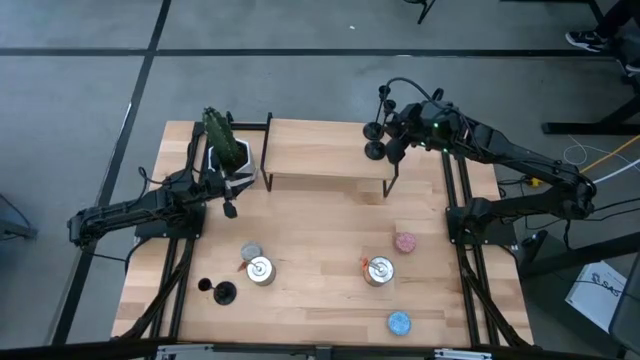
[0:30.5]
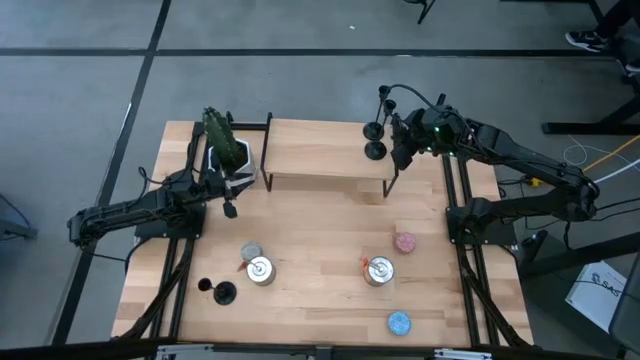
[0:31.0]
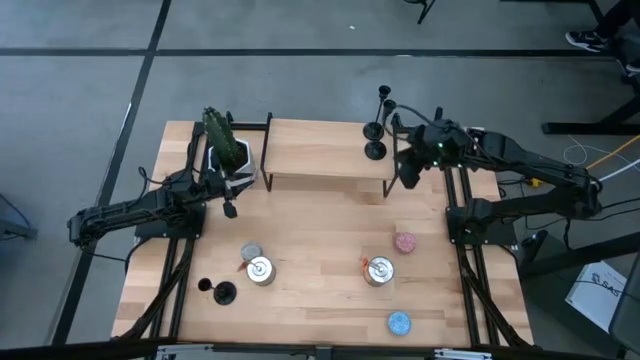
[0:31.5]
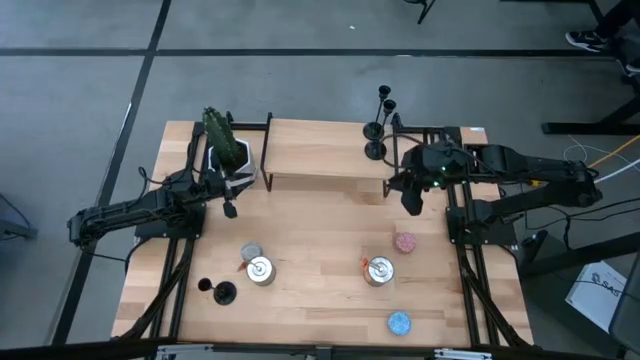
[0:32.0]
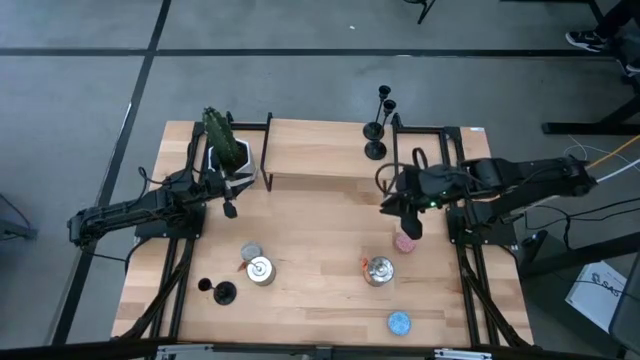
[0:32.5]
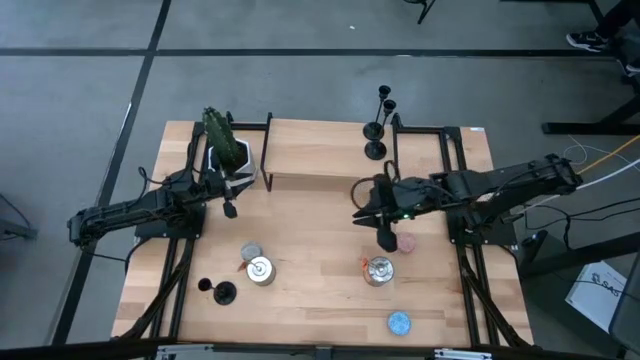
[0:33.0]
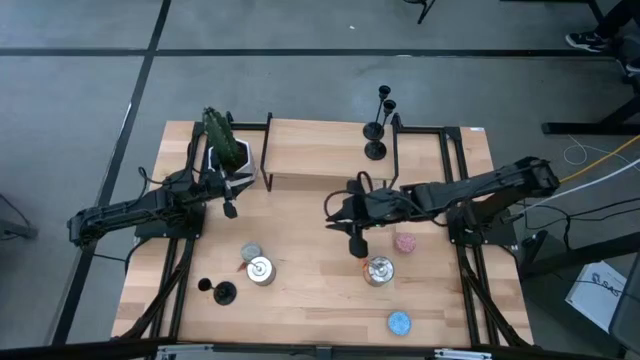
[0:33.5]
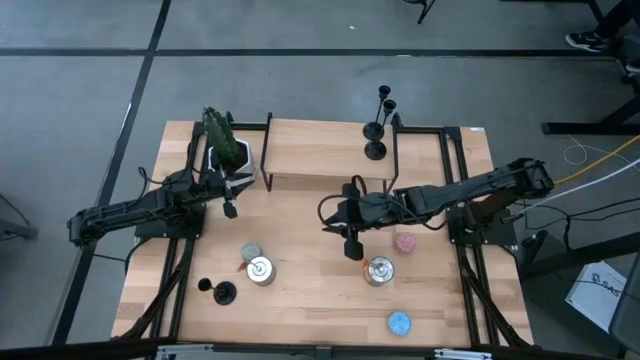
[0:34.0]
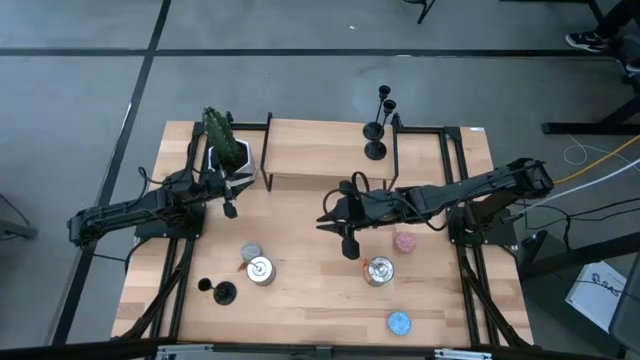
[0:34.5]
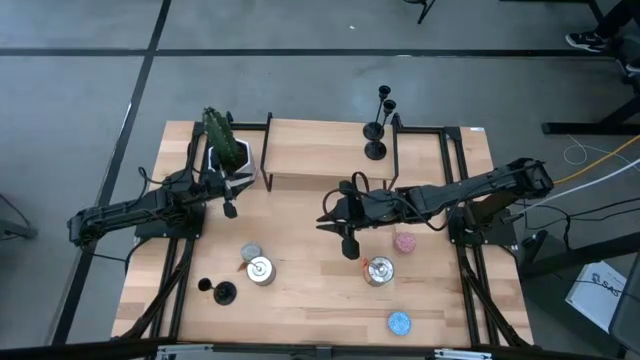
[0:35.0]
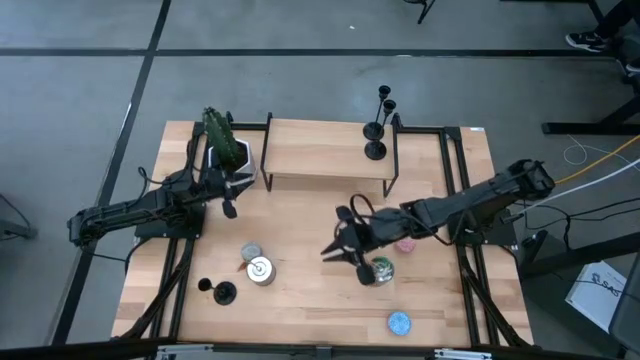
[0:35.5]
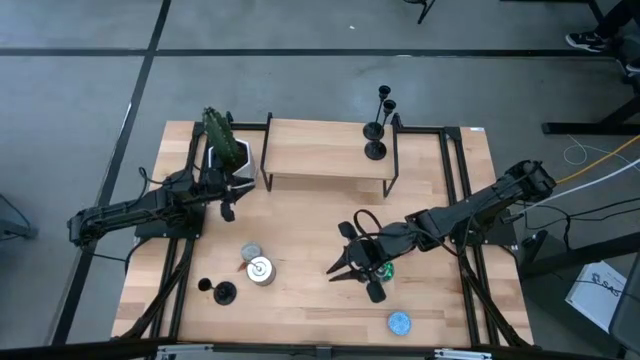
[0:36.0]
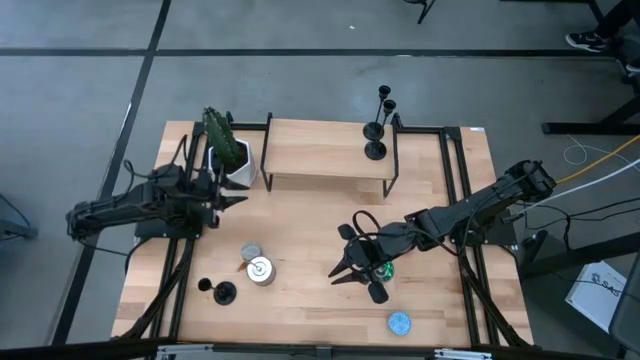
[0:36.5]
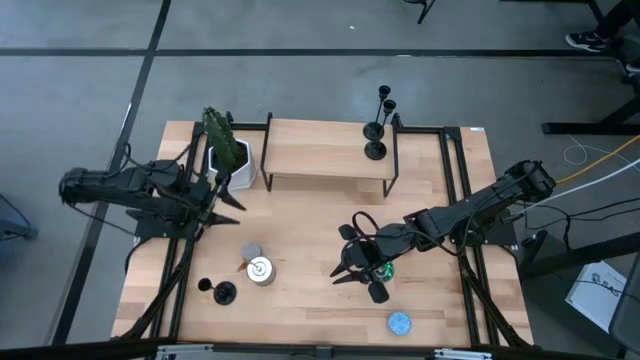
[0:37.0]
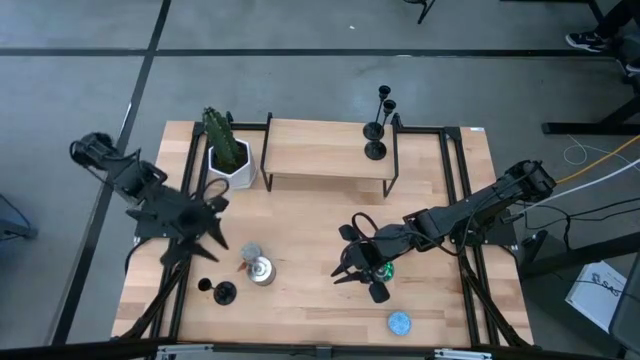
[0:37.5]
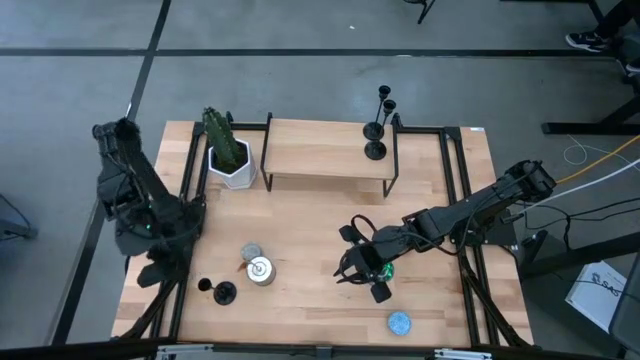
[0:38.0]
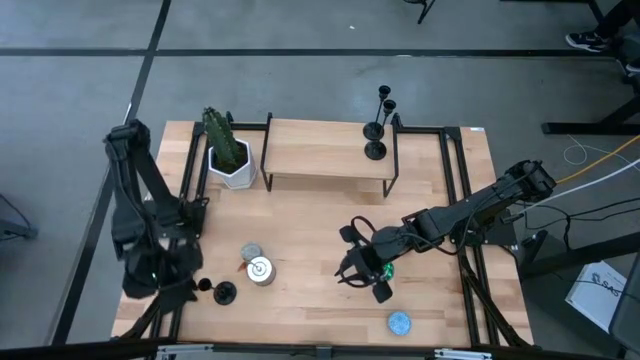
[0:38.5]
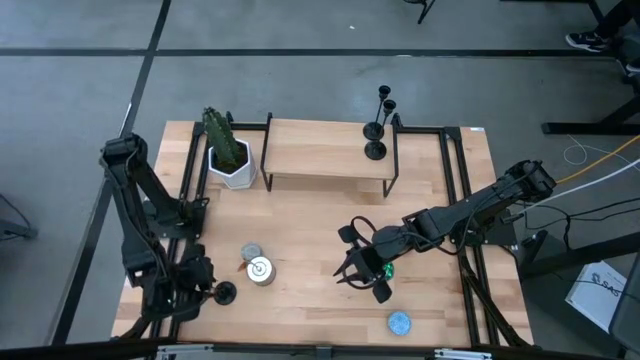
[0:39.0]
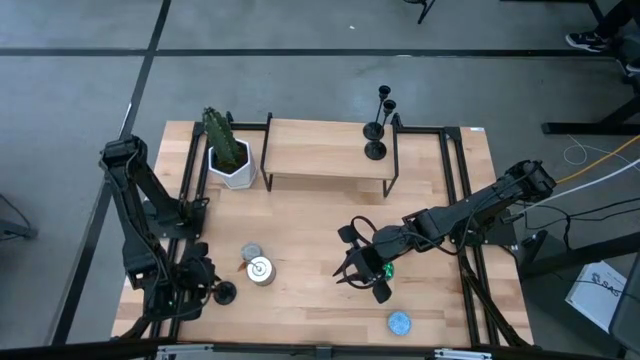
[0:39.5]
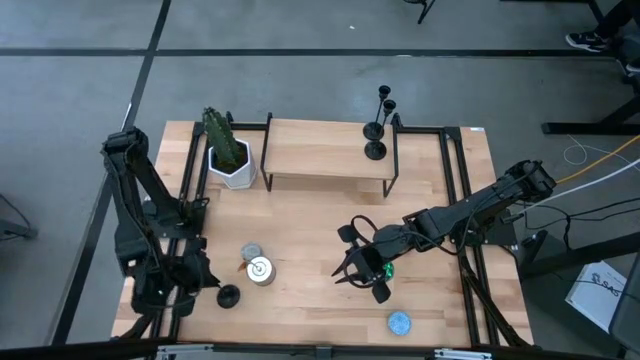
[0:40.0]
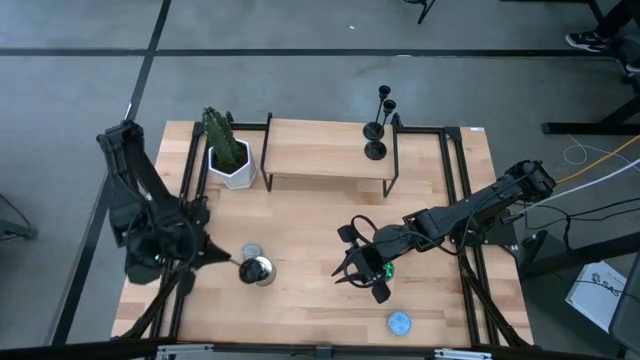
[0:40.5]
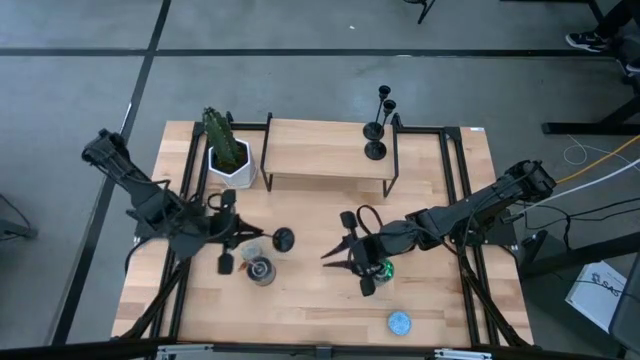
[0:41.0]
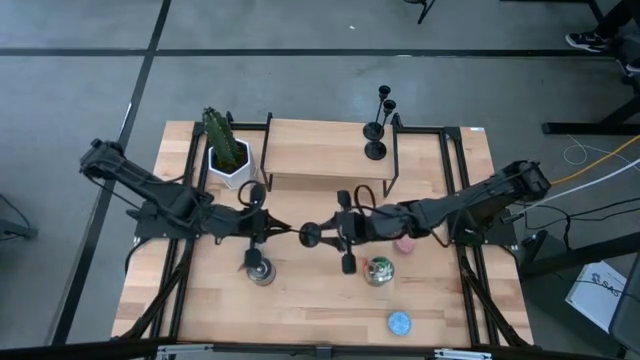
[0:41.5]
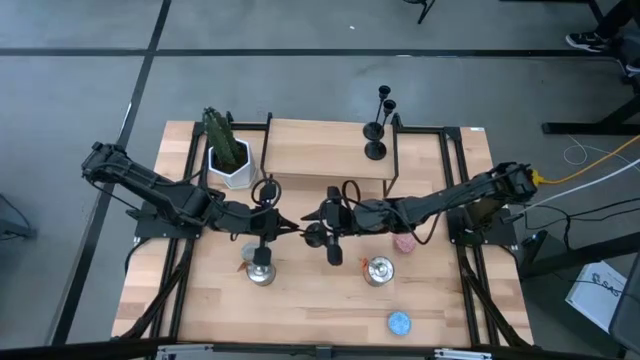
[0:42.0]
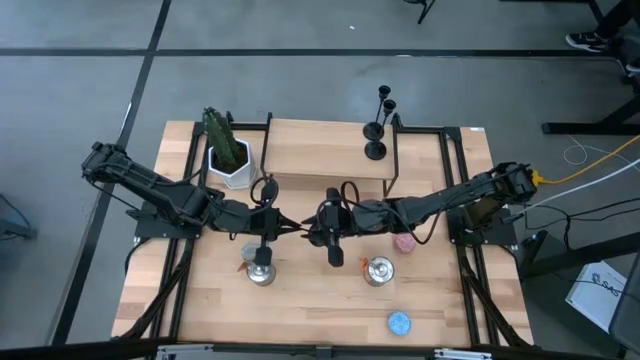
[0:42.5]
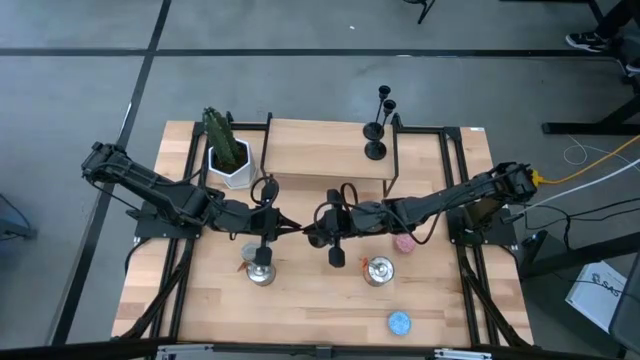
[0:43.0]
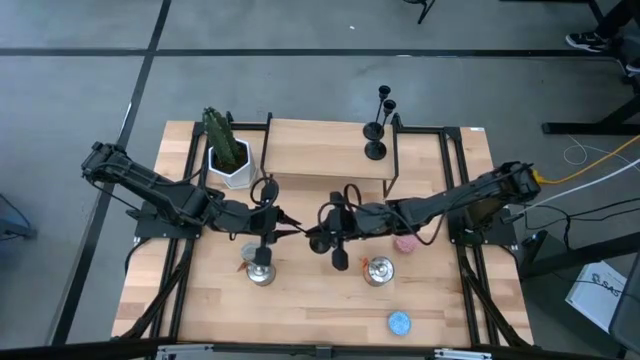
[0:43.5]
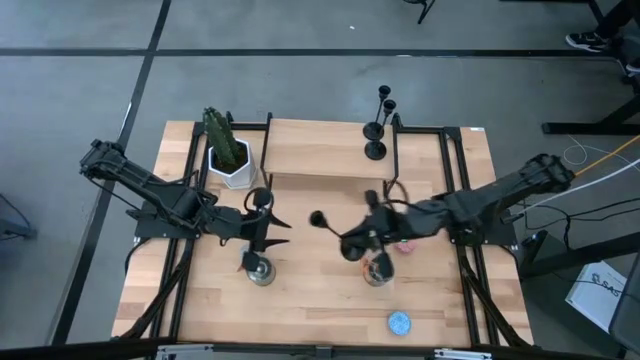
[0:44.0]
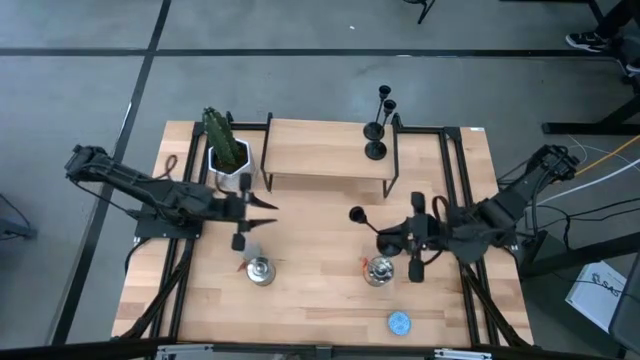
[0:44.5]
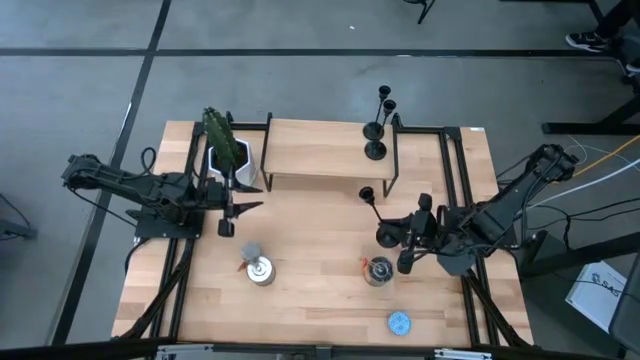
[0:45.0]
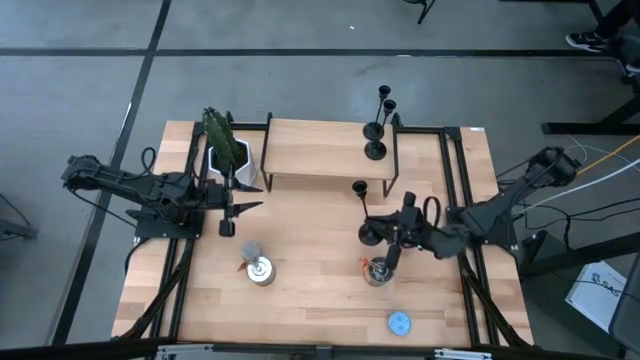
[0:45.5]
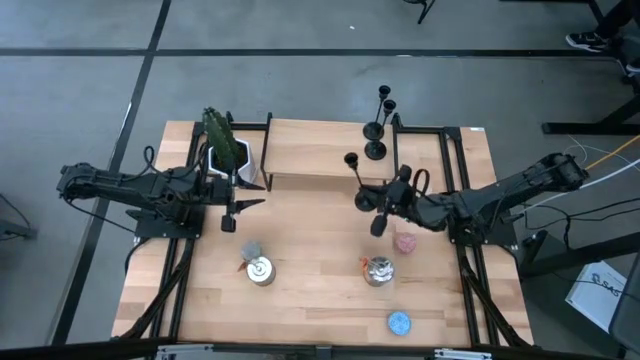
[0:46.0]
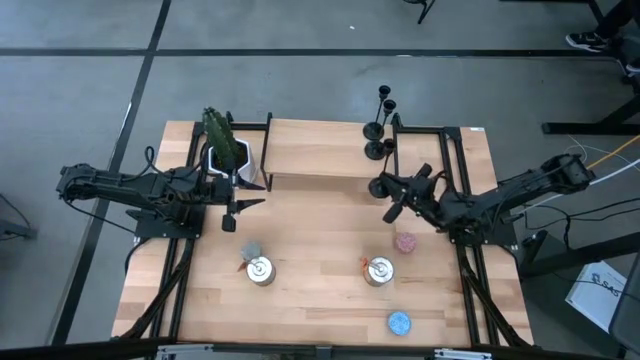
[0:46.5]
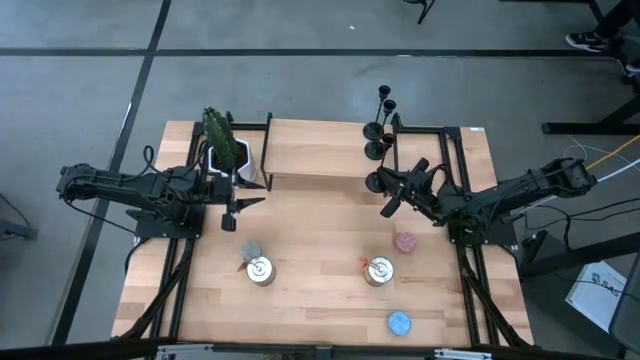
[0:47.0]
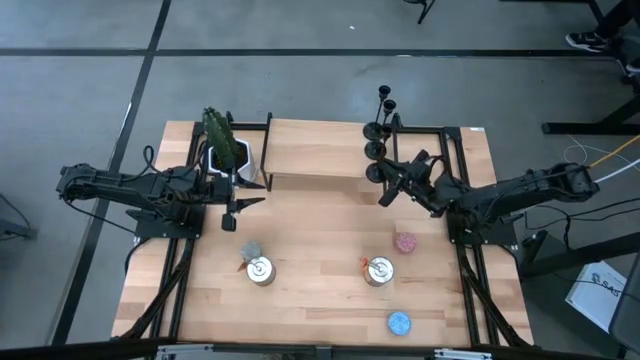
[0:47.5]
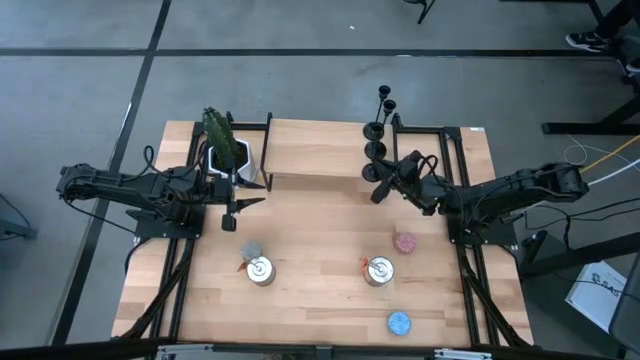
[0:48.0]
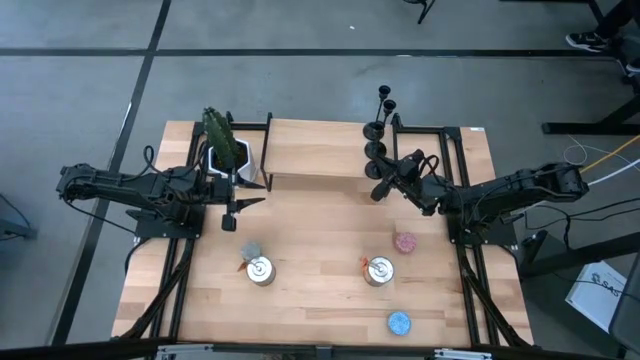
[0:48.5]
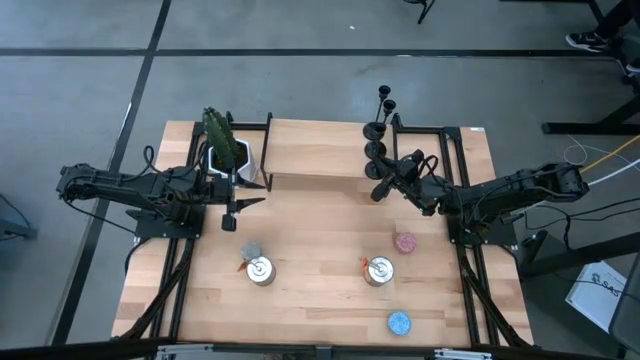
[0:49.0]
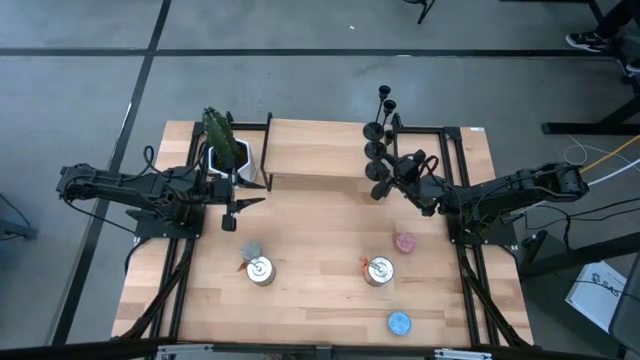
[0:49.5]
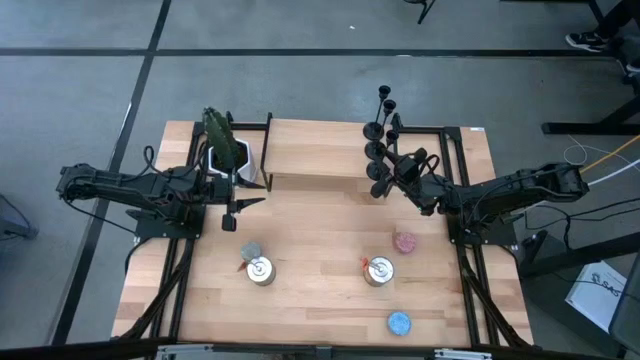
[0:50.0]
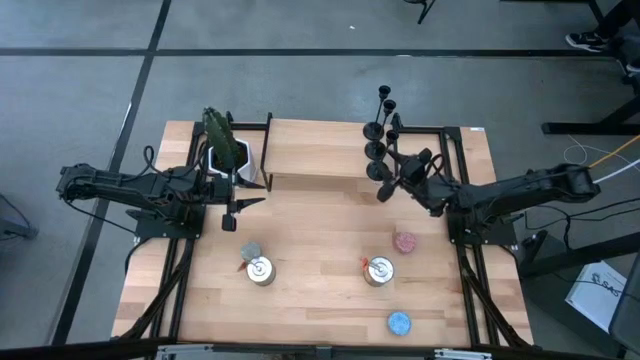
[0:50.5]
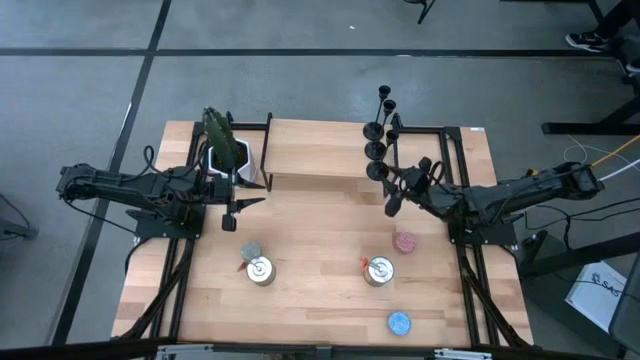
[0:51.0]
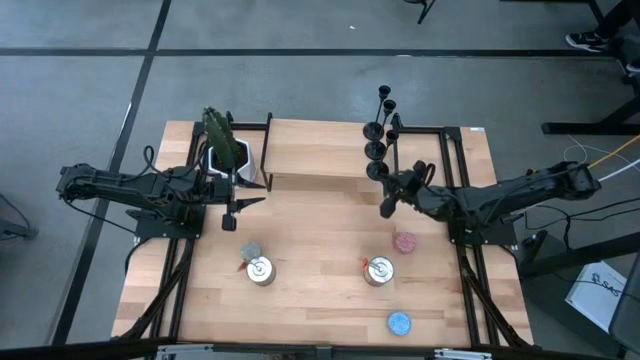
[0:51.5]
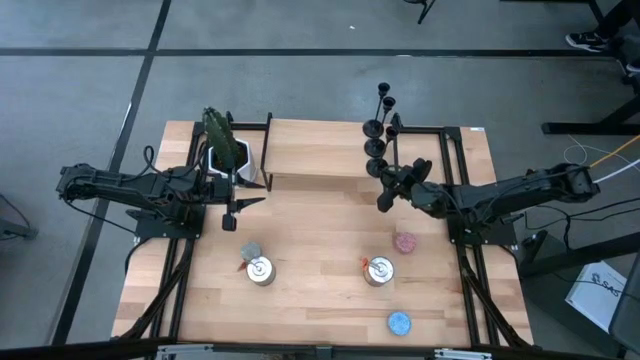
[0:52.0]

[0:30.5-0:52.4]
Task: Pick & Place candle stick holders
Align the black candle holder with the other black candle holders on the shelf
